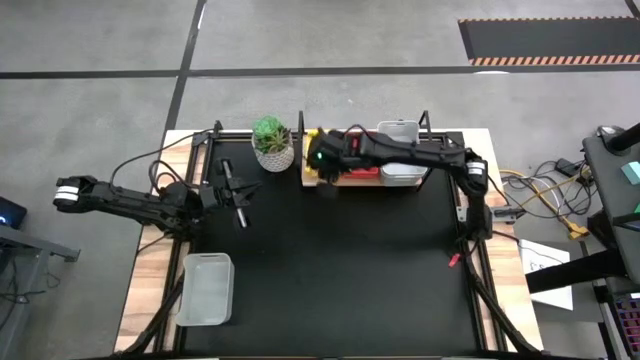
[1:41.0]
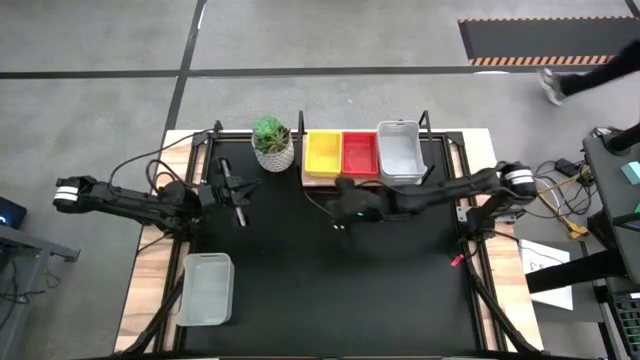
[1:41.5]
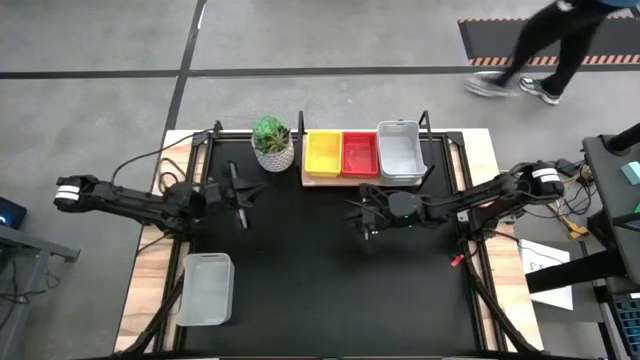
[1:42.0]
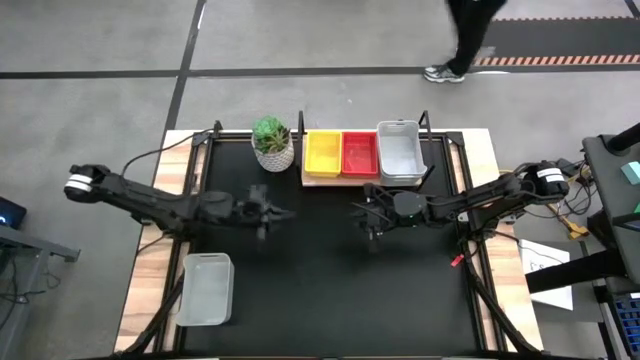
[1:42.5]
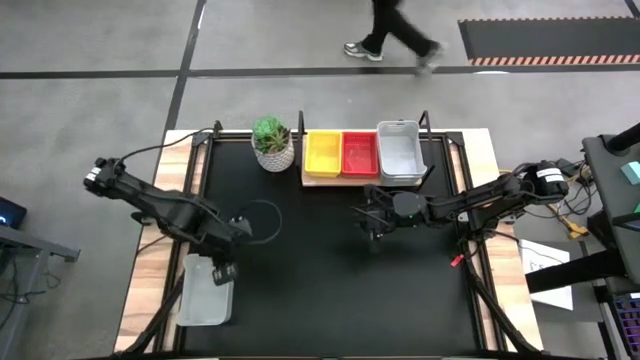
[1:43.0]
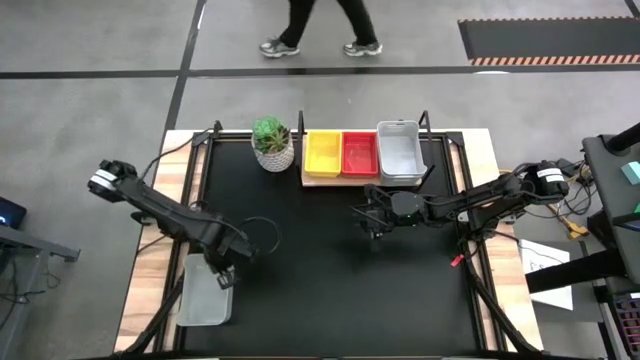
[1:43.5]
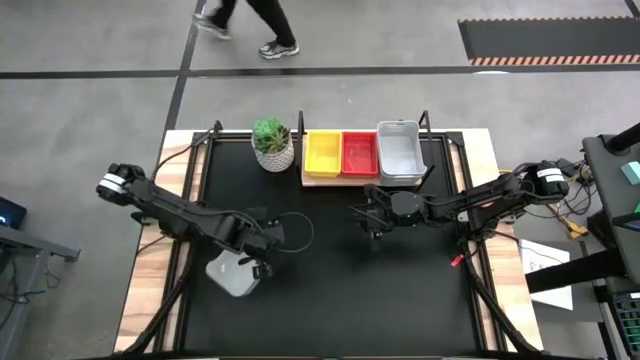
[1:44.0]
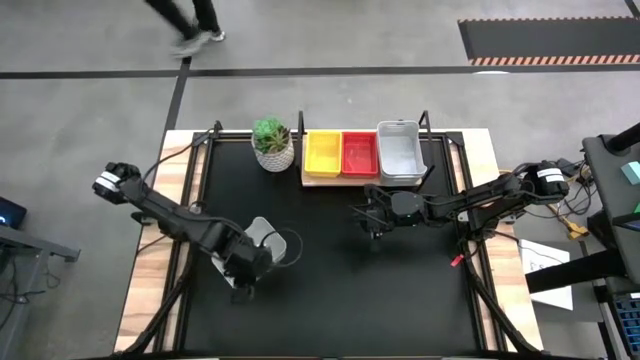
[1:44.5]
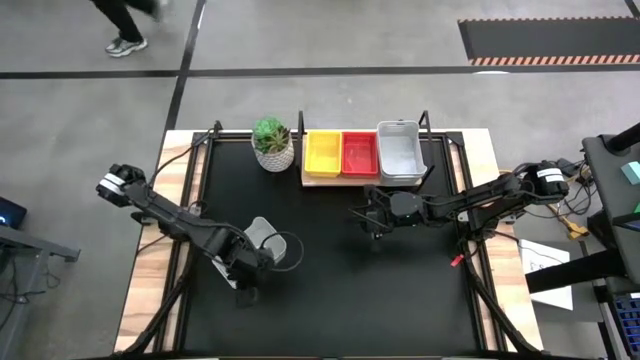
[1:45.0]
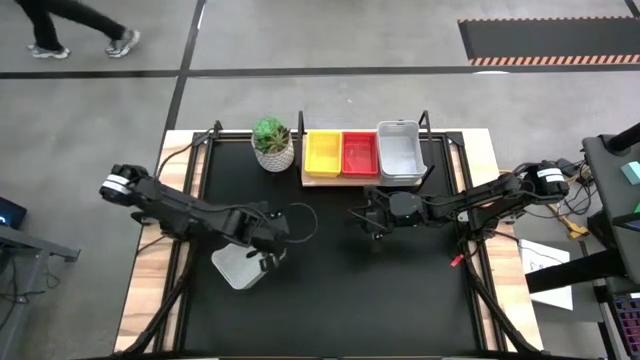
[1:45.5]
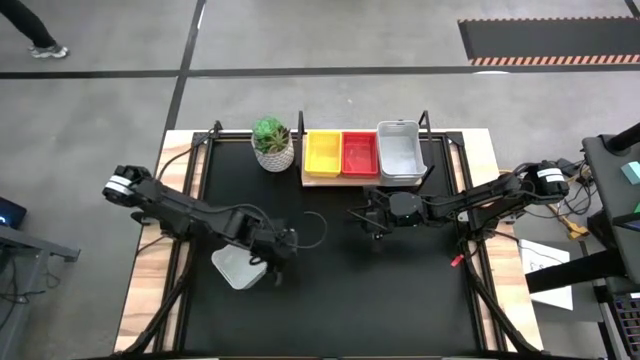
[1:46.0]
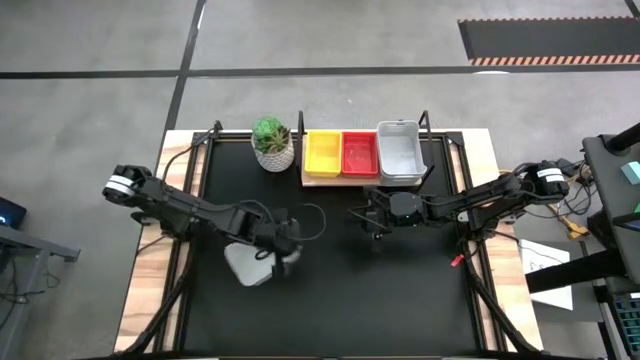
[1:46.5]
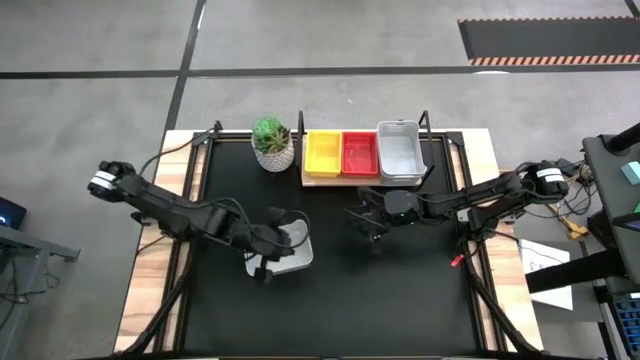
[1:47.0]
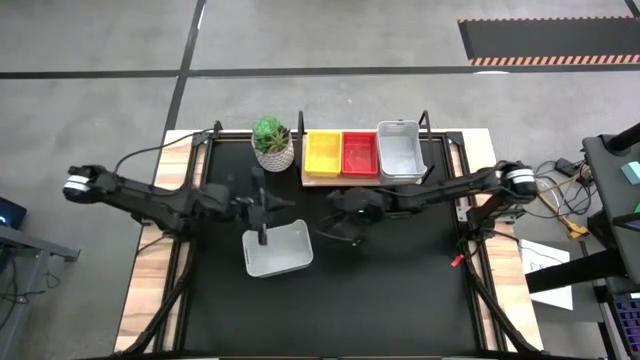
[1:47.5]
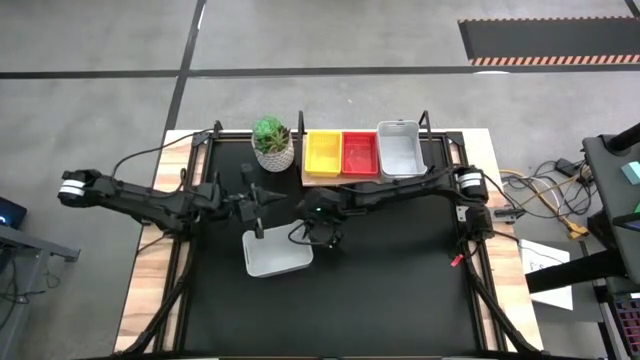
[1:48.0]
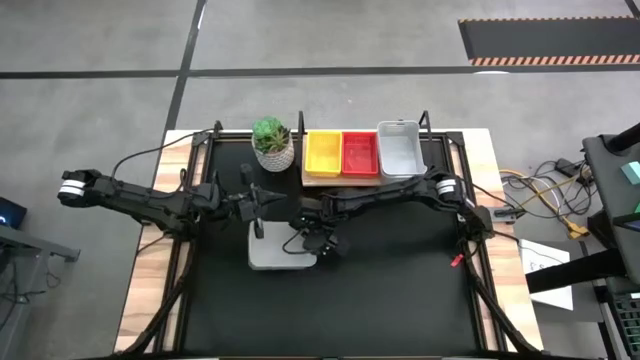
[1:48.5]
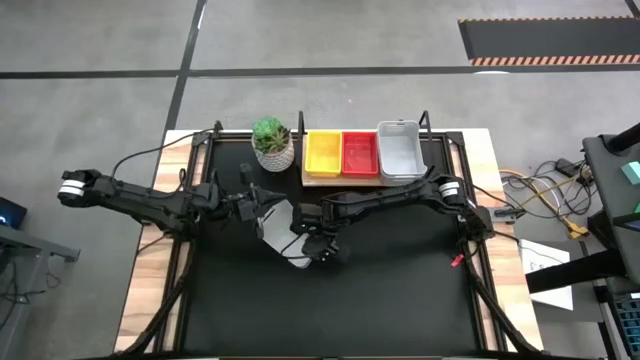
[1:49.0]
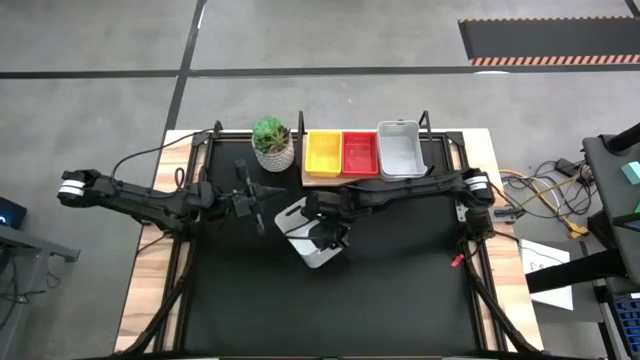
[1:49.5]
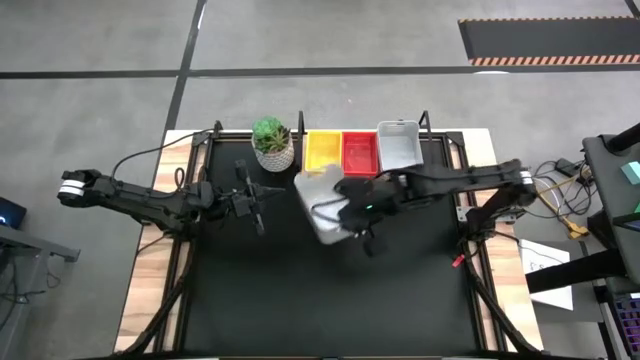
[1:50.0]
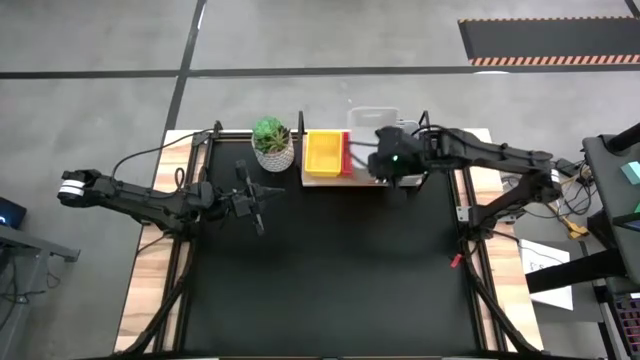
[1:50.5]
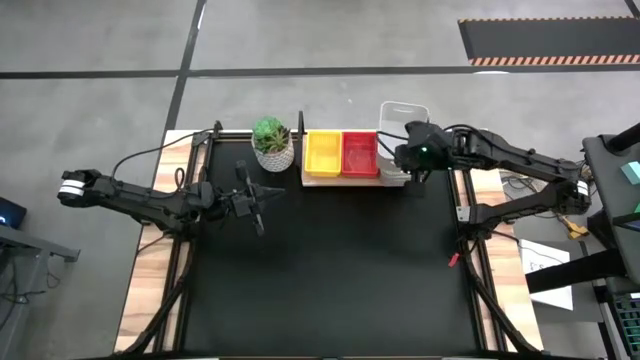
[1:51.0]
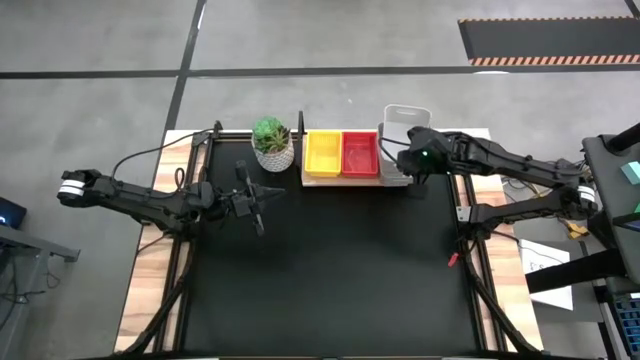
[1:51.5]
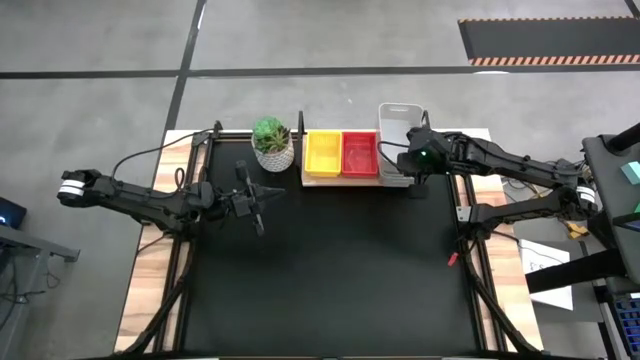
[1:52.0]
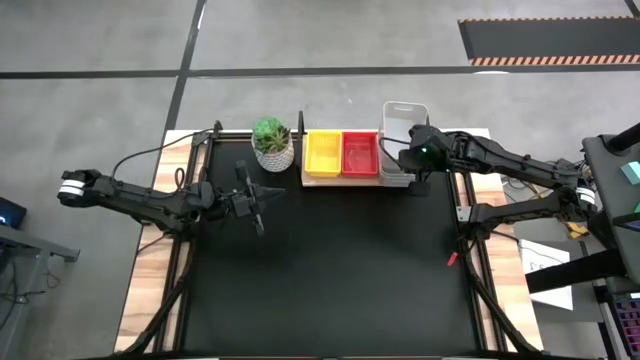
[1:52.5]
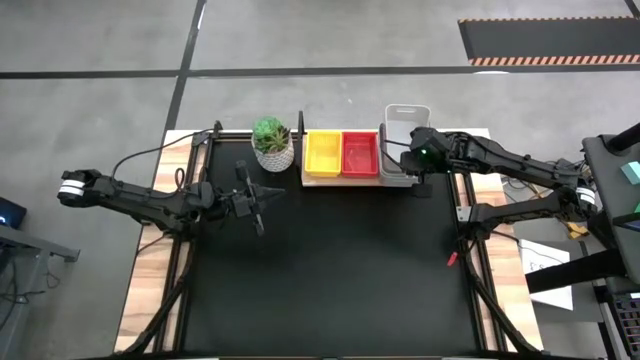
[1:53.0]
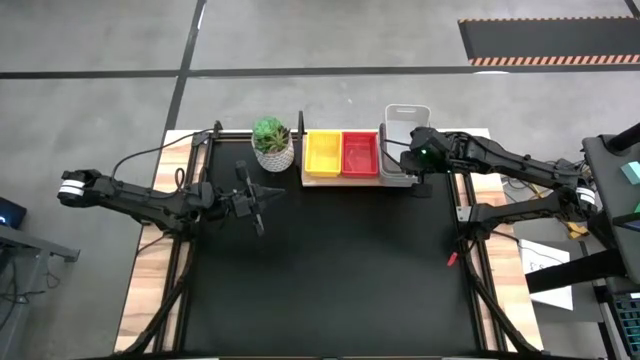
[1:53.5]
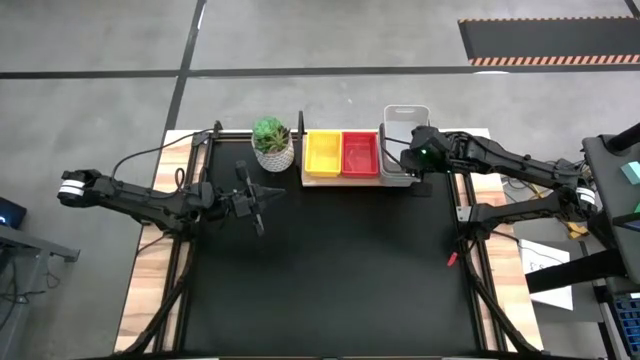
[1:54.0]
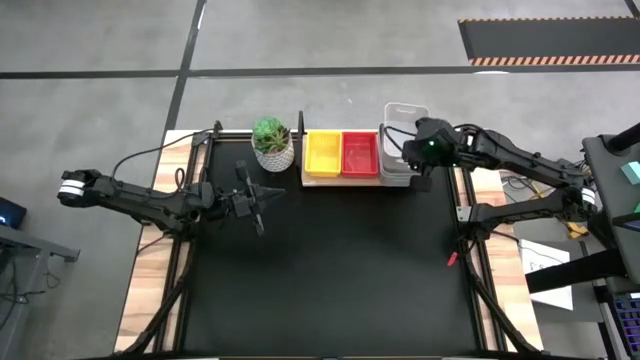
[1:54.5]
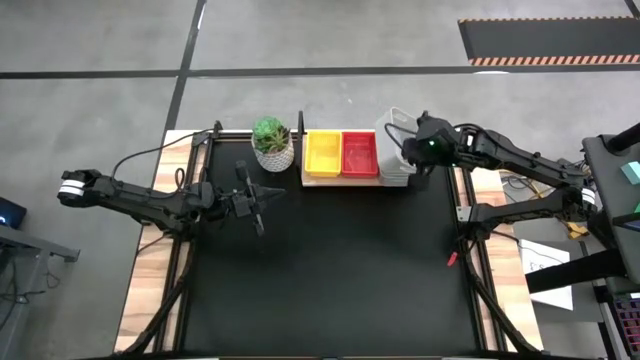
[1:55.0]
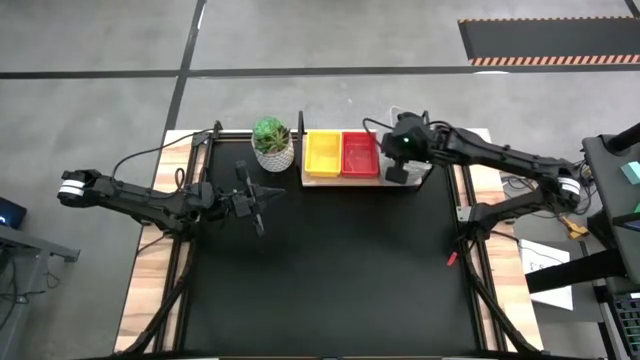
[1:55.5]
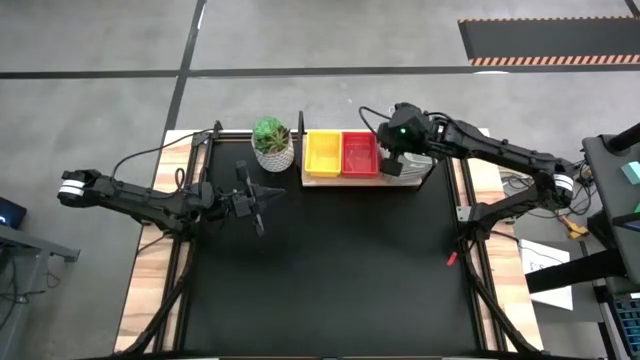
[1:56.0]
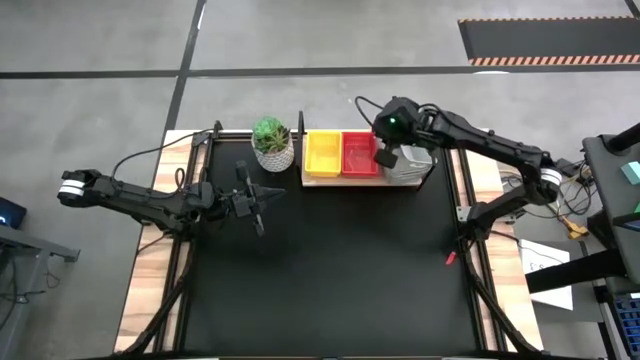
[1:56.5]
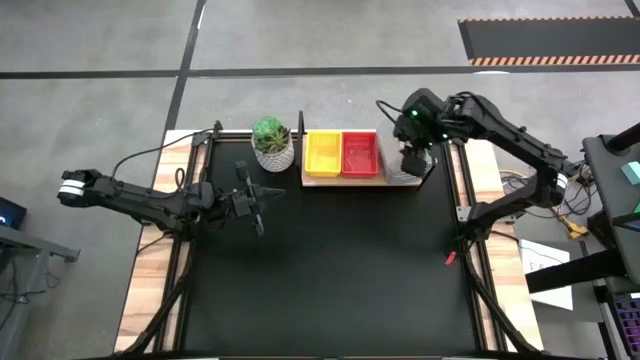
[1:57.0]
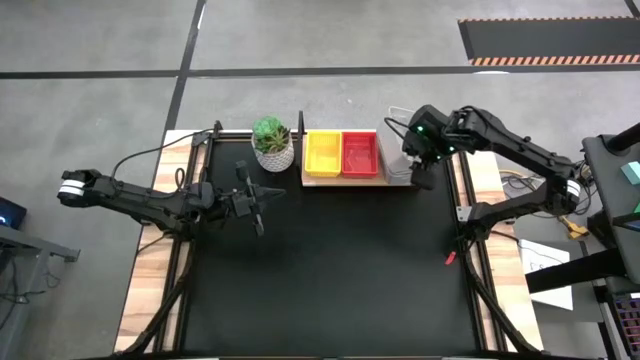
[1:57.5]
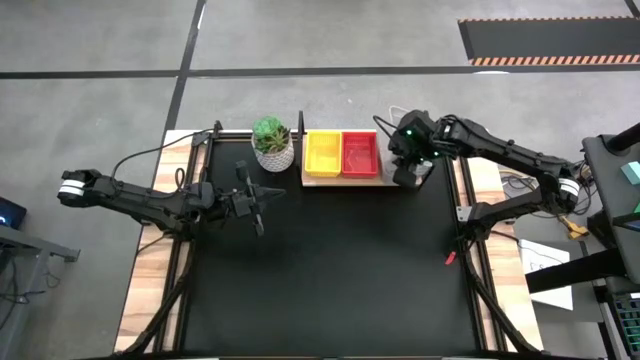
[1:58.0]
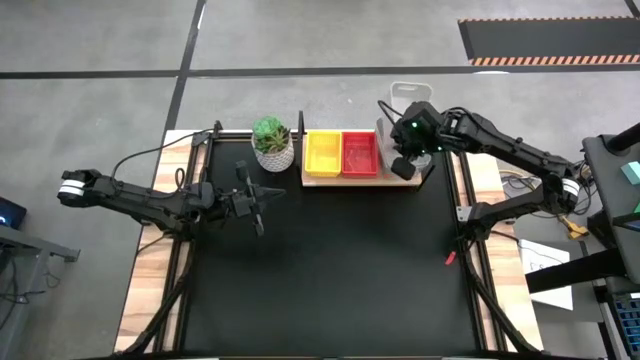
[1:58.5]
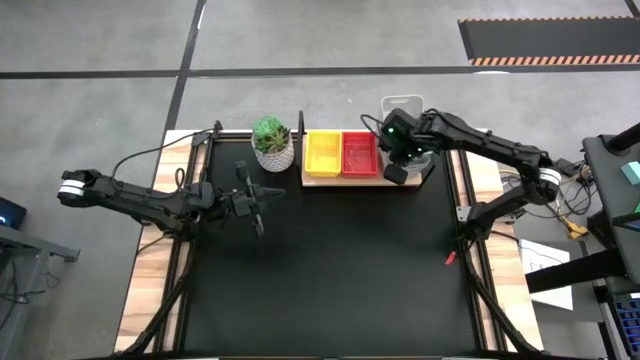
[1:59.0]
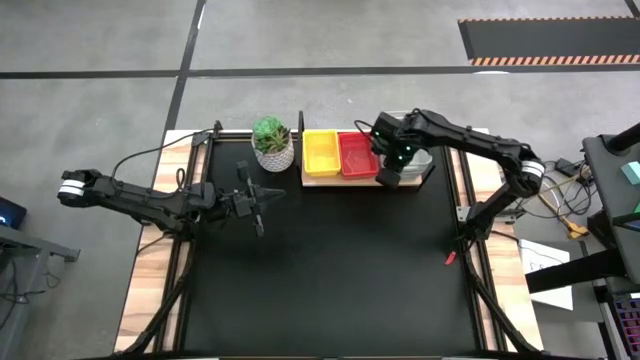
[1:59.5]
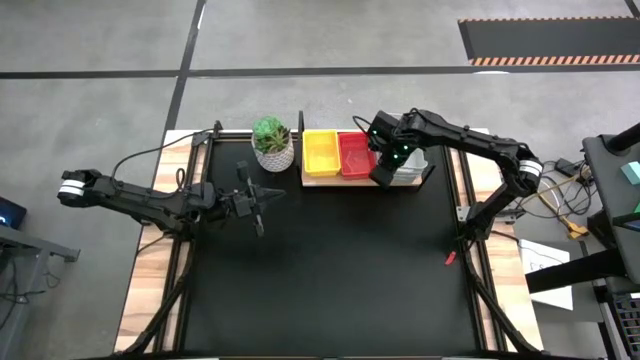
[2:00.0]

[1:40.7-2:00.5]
Task: Stack baskets on shelf by color
Stack the gray bin on top of the gray bin on the shelf
